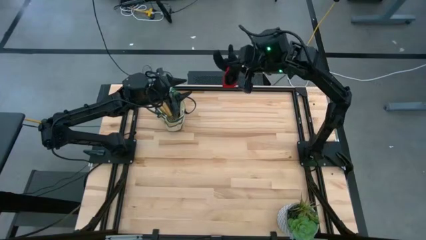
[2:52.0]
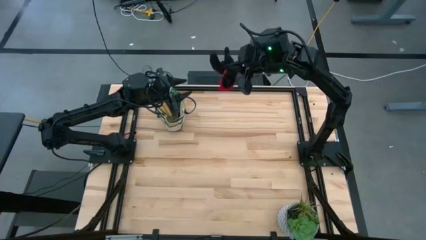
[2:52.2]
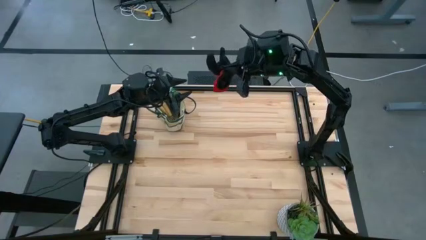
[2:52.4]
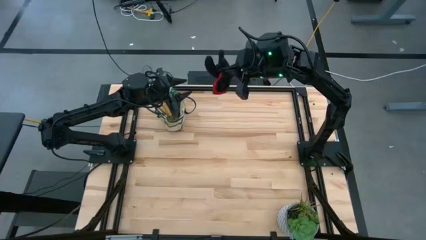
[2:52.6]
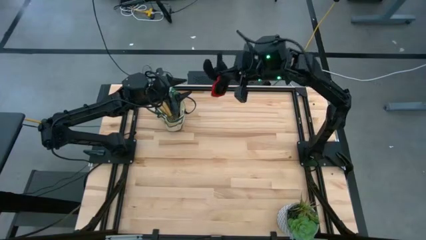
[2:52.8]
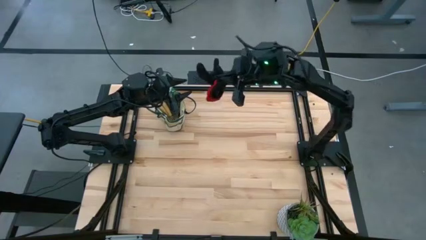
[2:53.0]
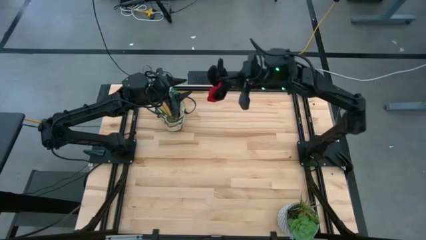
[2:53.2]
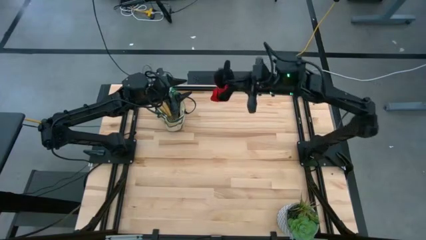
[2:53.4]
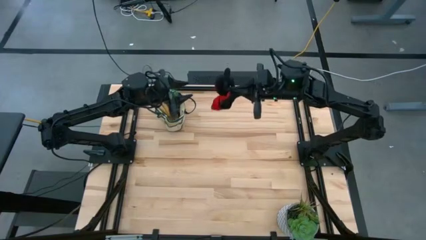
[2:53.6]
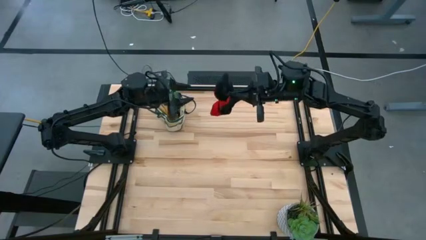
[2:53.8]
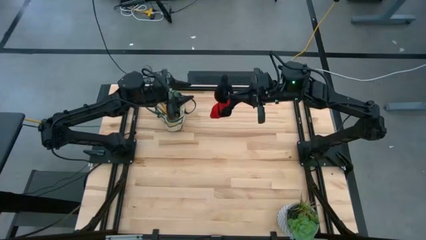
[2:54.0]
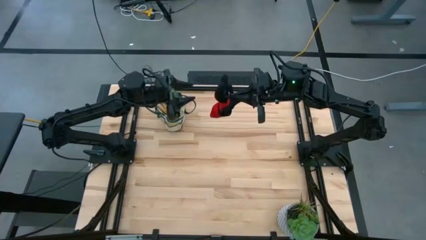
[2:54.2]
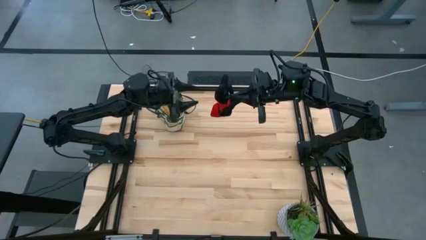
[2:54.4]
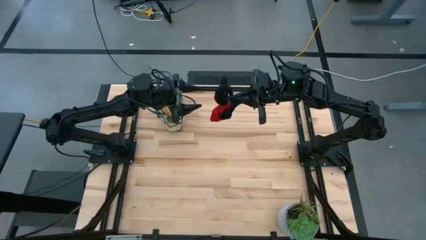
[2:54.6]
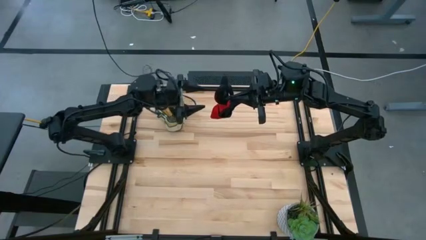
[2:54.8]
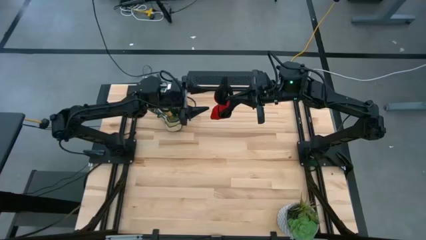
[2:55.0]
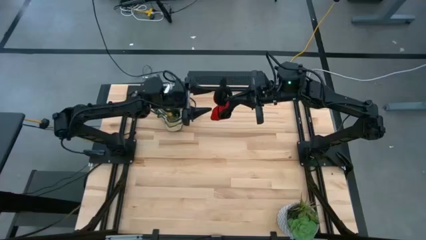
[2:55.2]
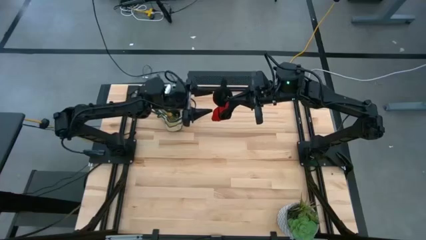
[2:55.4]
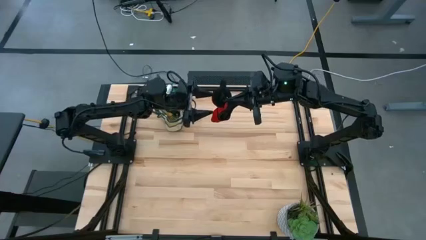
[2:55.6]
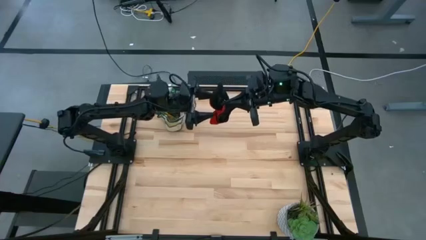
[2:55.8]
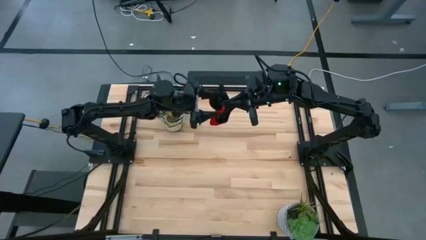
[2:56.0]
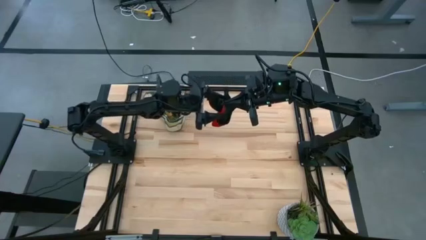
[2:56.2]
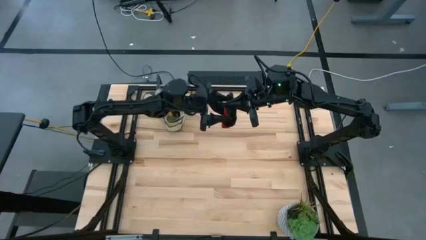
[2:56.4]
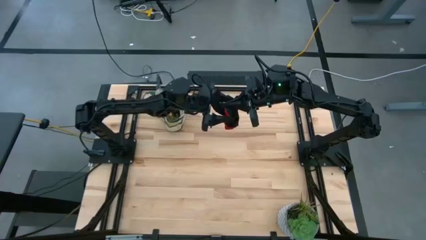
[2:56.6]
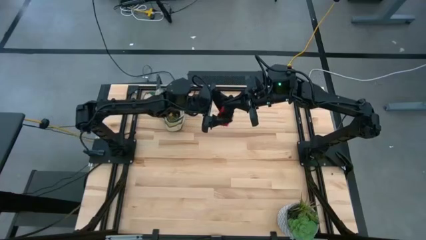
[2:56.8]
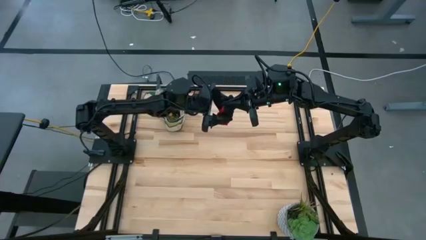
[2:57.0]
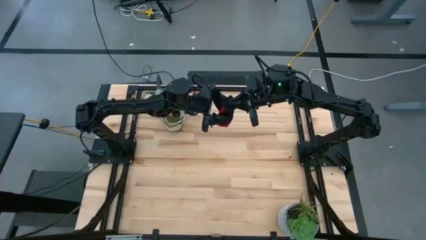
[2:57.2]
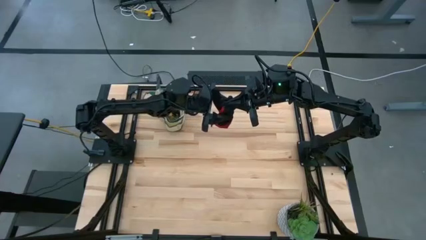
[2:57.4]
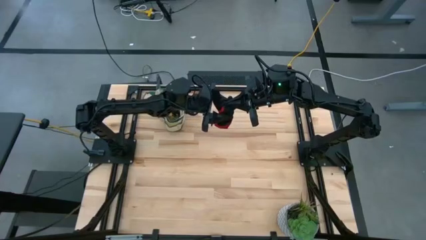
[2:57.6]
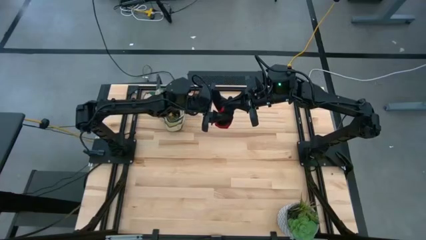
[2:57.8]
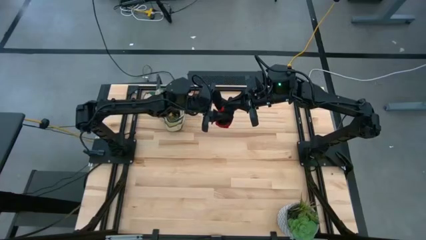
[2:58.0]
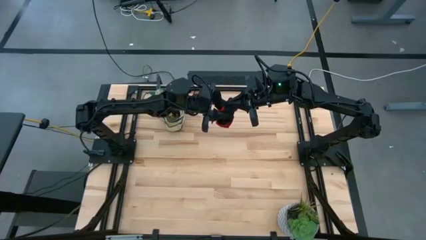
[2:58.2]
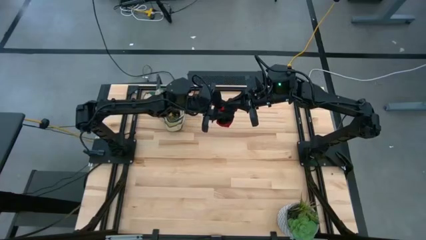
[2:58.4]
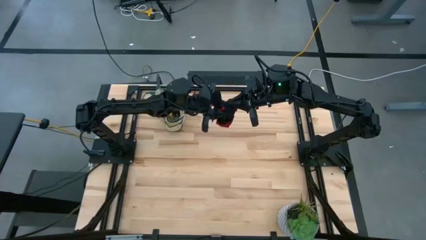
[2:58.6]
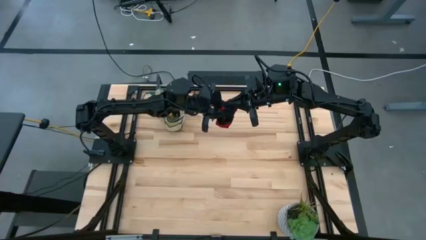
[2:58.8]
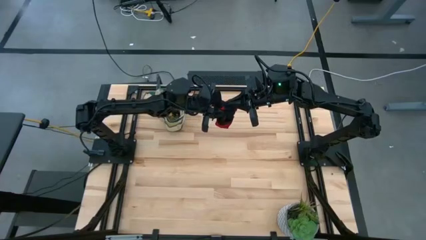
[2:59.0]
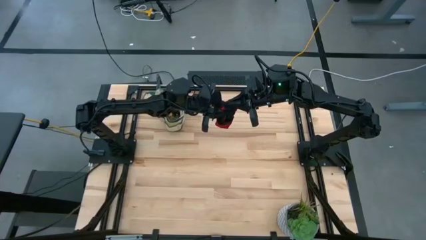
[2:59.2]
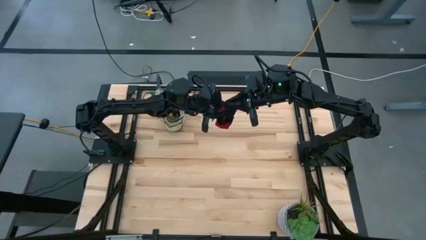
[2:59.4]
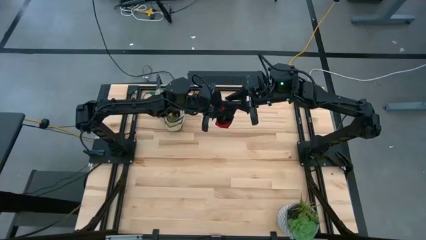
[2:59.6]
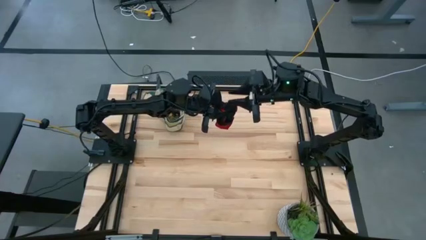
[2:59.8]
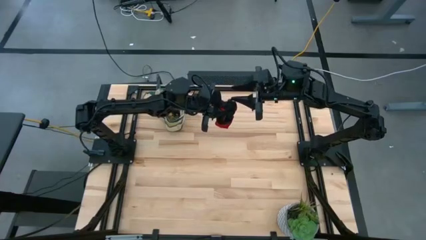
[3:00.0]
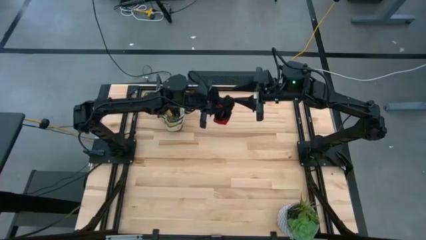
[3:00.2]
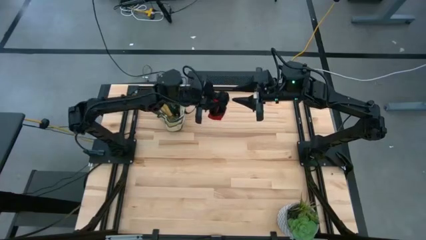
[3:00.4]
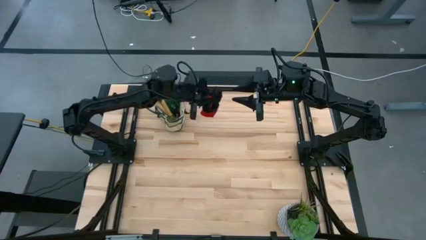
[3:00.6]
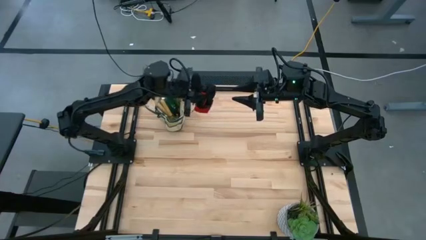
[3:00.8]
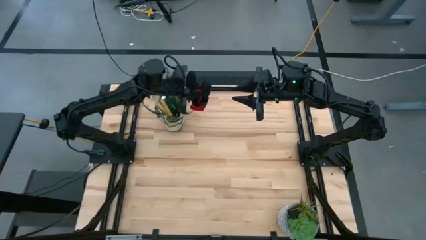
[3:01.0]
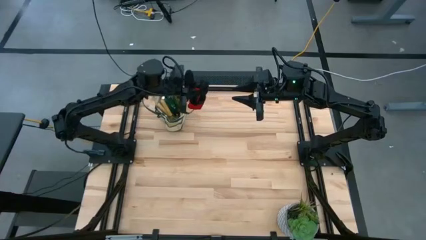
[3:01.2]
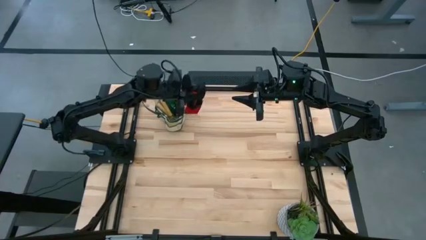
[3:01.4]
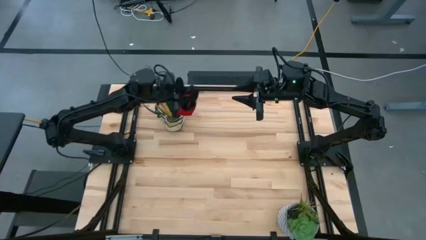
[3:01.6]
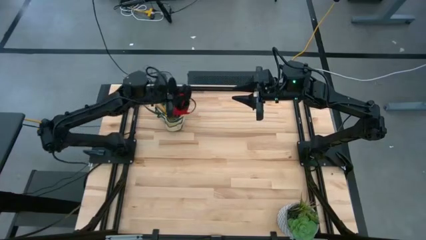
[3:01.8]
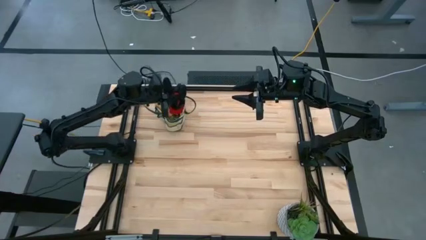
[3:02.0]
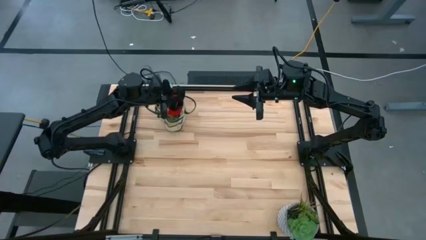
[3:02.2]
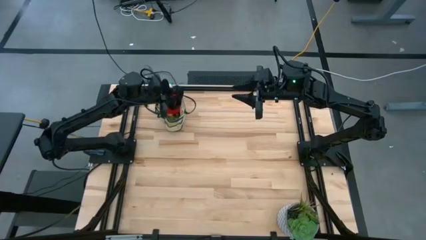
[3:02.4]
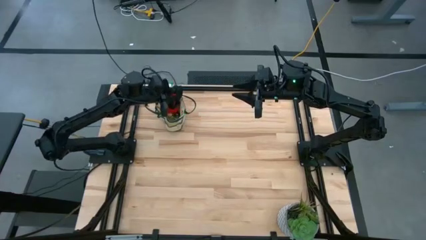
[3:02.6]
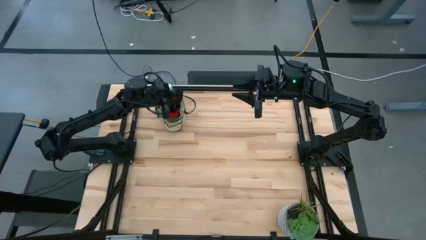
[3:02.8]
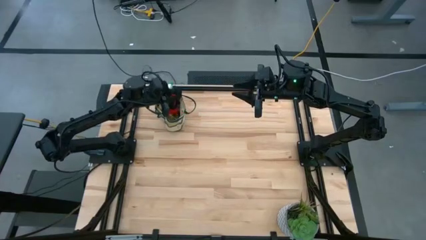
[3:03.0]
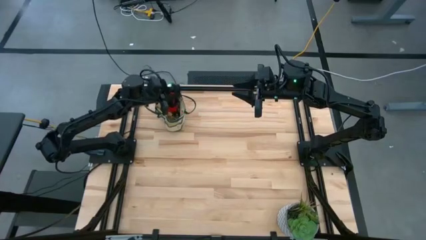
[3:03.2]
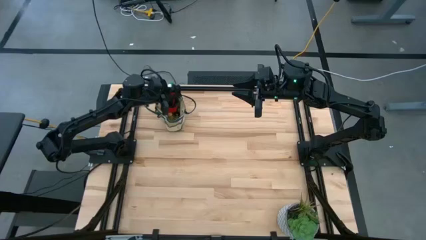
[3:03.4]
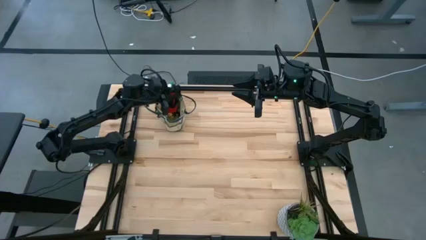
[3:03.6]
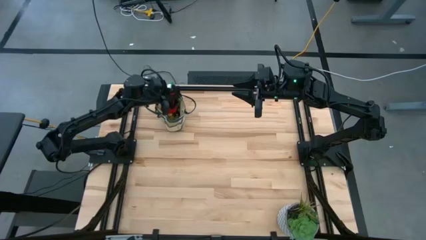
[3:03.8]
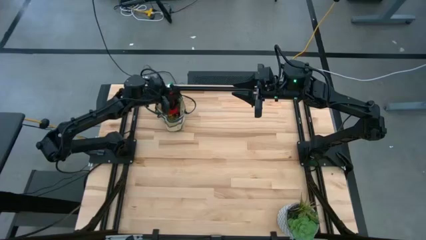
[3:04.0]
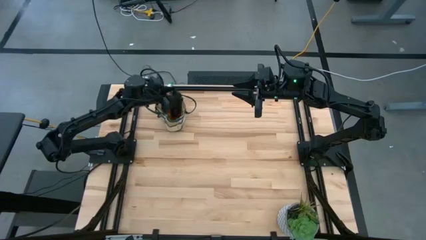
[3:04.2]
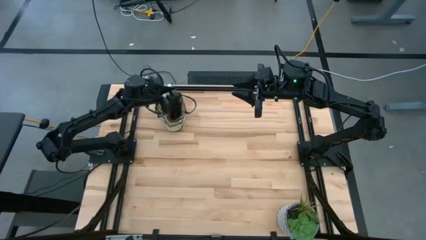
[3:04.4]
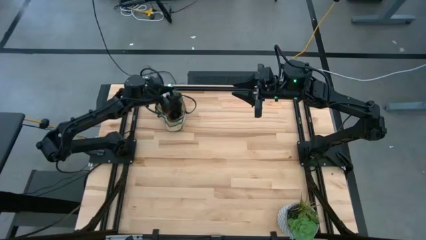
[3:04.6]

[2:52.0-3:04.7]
Task: Pick & Place Garden tools in Gardening bag
Put the red gloves into the gardening bag

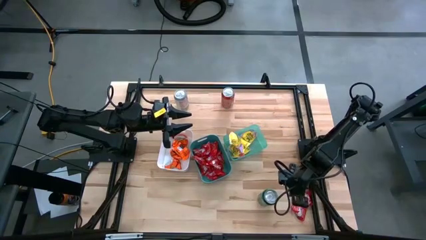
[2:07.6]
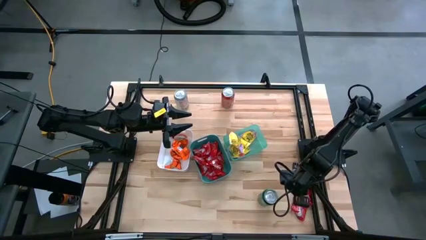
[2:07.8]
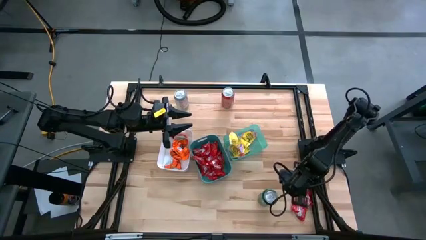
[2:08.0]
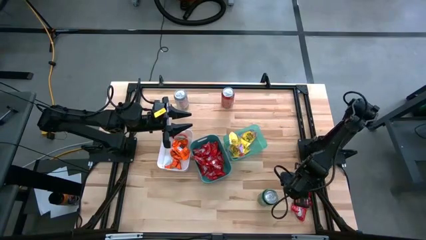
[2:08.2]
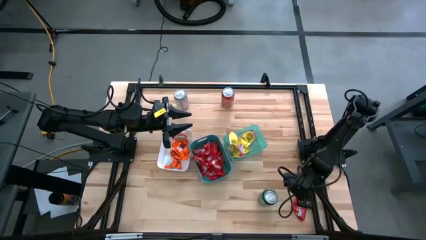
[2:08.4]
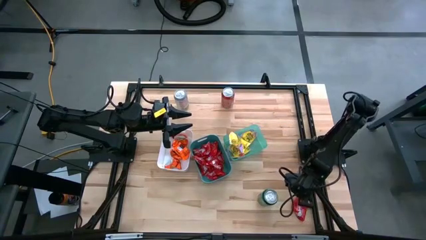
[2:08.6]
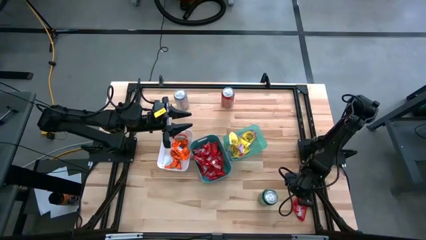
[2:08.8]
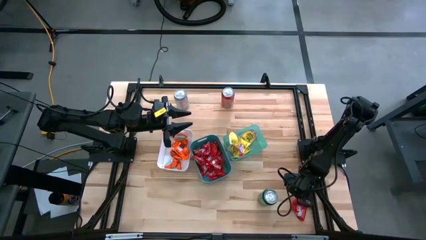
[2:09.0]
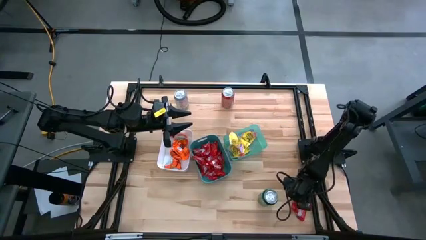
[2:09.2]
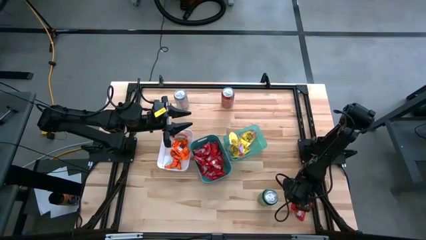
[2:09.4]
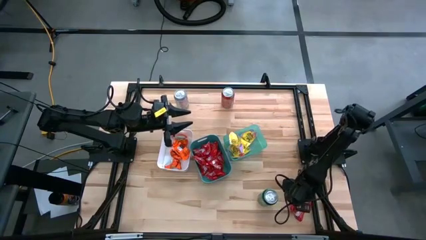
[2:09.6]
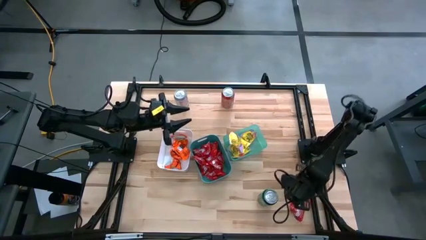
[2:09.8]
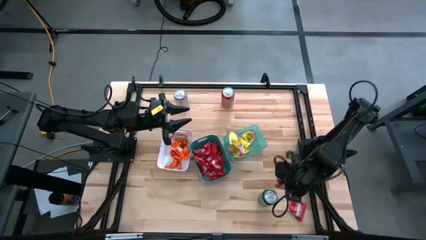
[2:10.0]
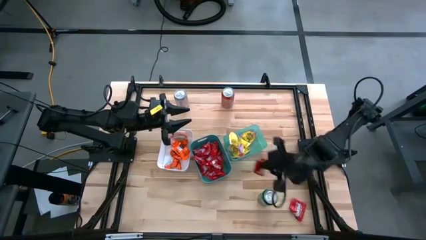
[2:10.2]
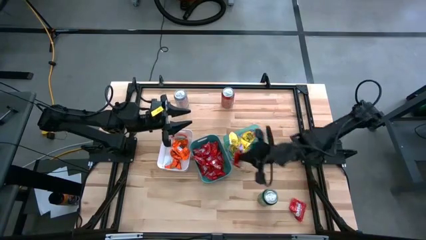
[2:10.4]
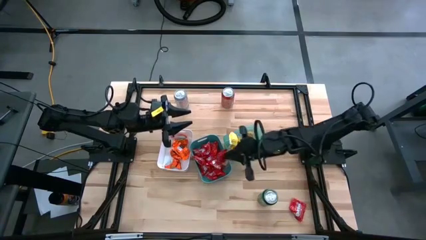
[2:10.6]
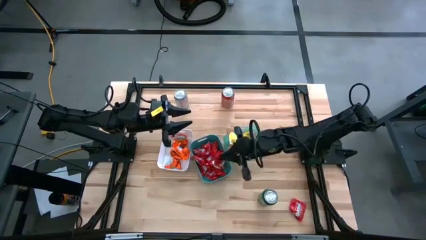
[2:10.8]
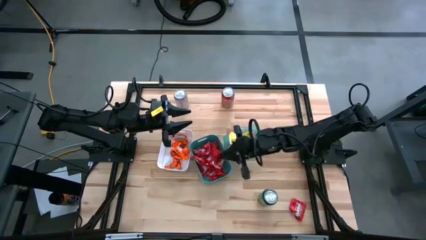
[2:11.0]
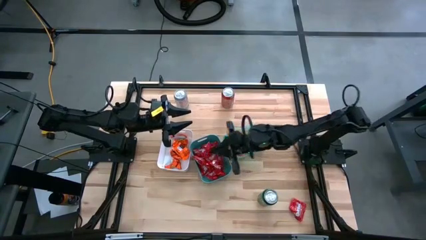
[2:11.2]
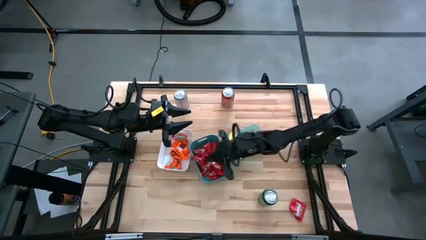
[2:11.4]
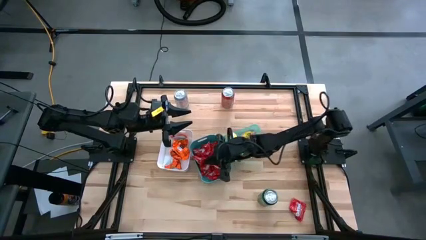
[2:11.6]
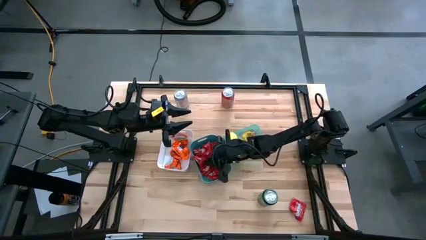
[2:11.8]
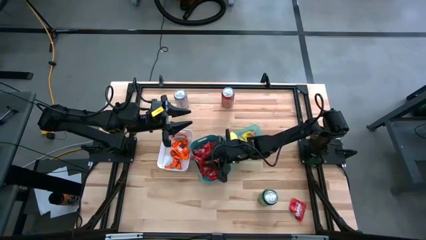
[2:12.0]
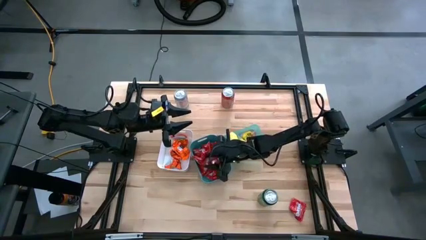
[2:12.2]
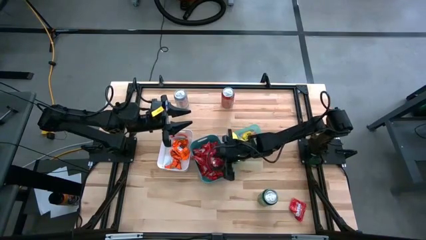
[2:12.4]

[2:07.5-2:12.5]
Task: Sort candy
Put the red candy into the green bin
